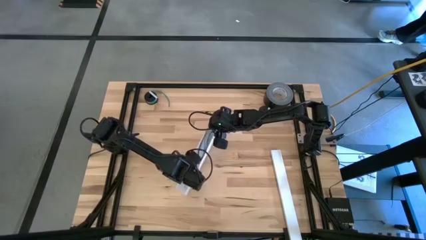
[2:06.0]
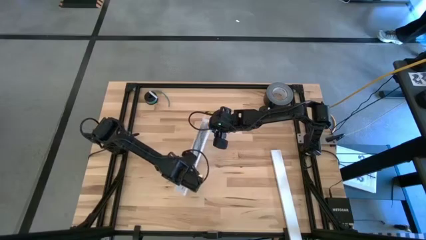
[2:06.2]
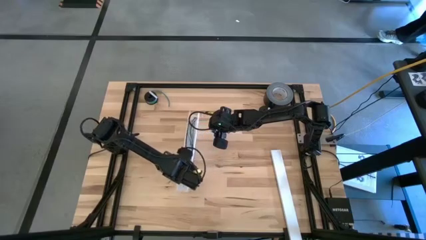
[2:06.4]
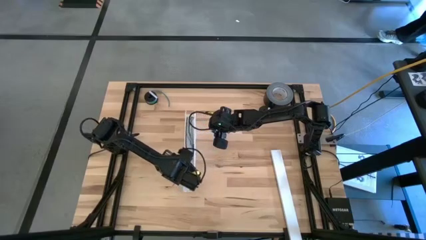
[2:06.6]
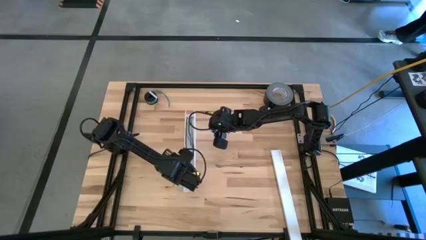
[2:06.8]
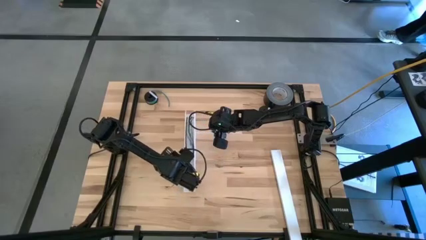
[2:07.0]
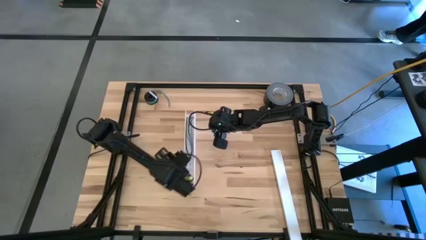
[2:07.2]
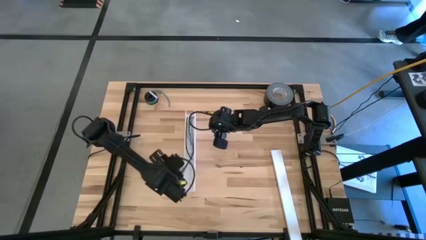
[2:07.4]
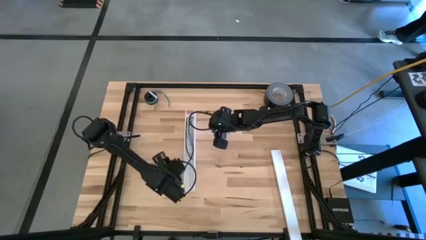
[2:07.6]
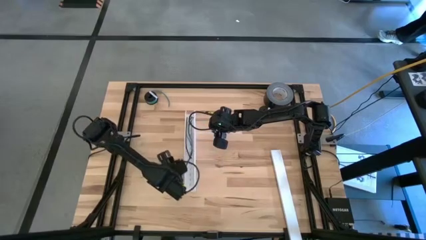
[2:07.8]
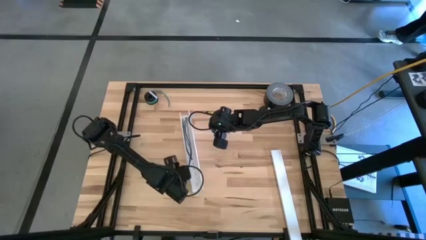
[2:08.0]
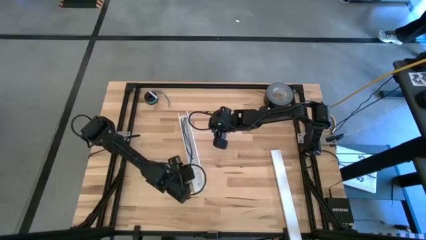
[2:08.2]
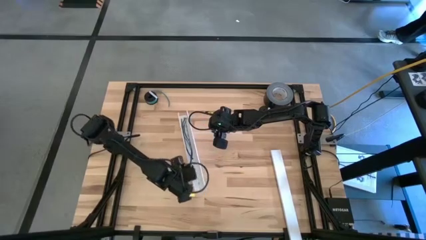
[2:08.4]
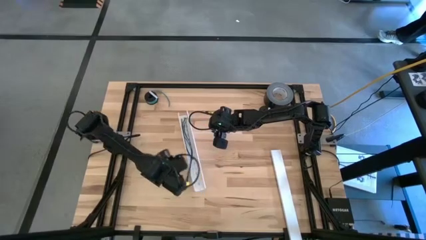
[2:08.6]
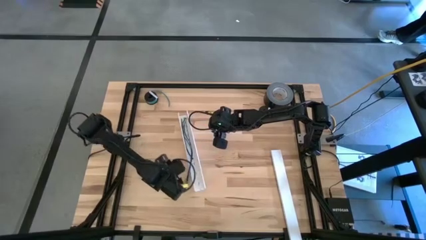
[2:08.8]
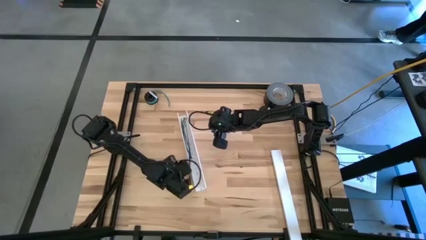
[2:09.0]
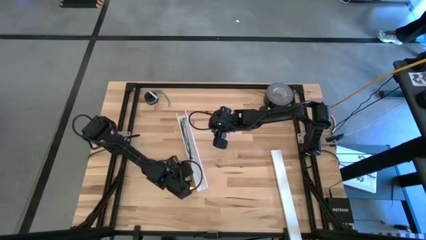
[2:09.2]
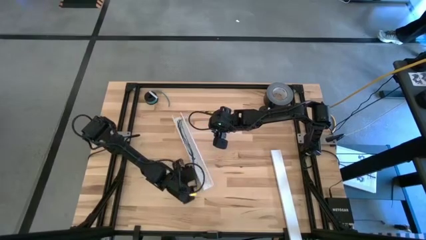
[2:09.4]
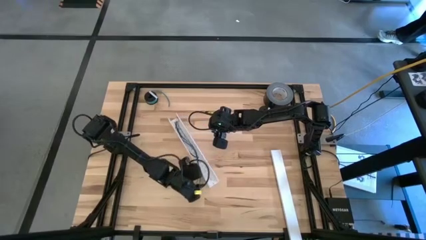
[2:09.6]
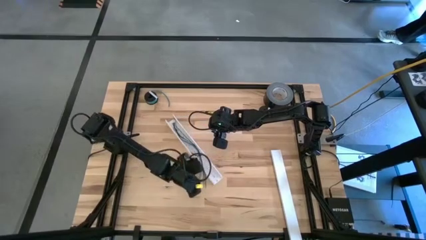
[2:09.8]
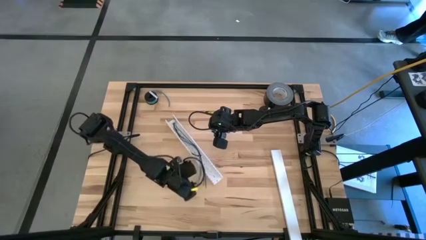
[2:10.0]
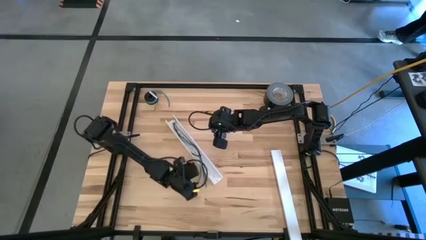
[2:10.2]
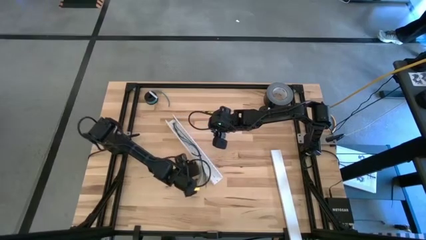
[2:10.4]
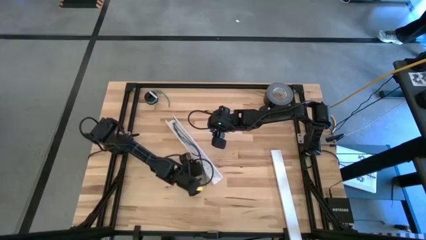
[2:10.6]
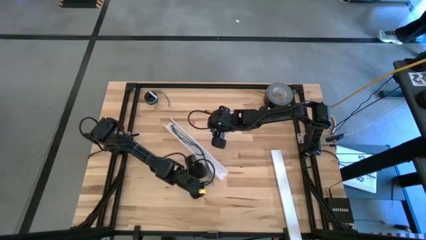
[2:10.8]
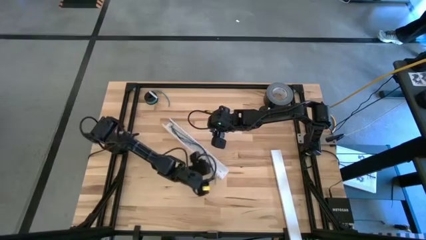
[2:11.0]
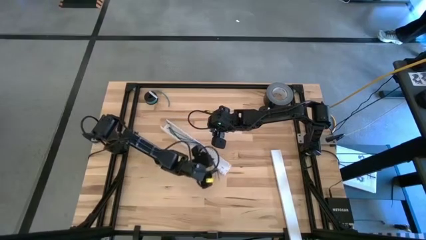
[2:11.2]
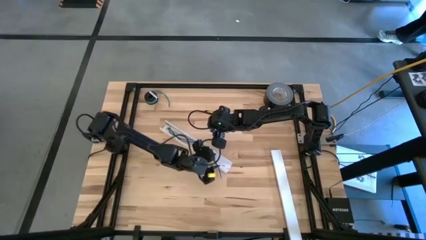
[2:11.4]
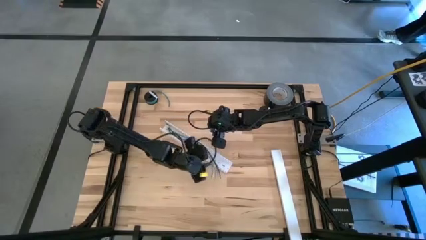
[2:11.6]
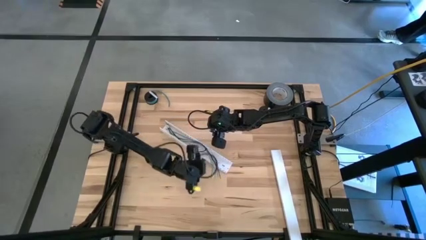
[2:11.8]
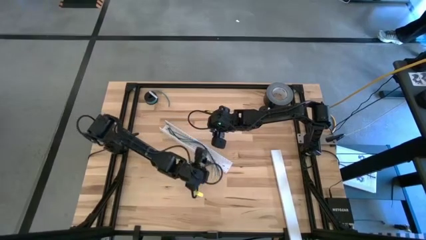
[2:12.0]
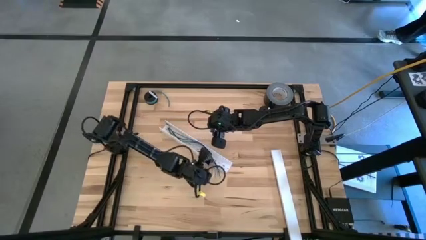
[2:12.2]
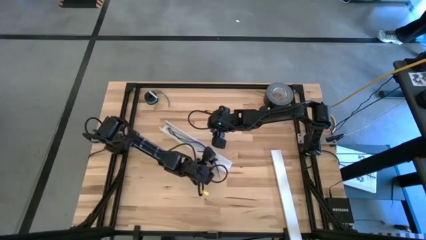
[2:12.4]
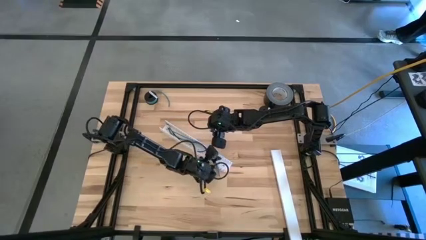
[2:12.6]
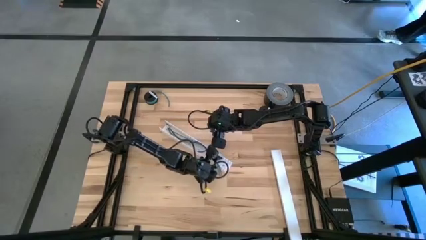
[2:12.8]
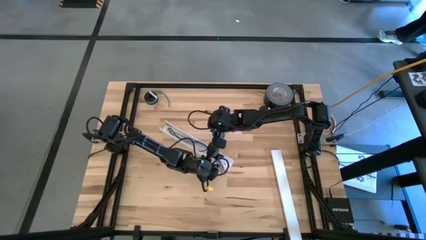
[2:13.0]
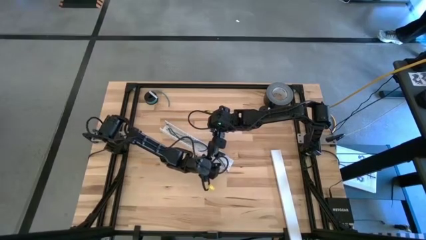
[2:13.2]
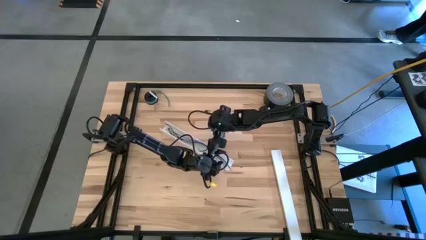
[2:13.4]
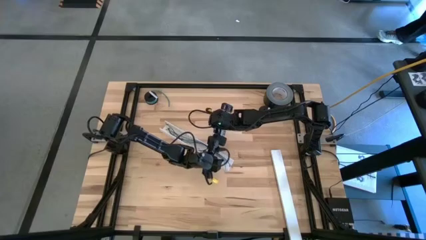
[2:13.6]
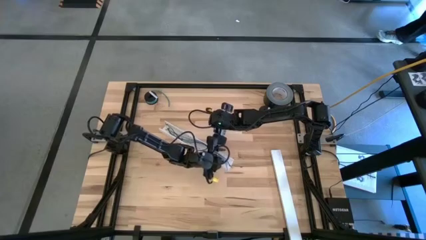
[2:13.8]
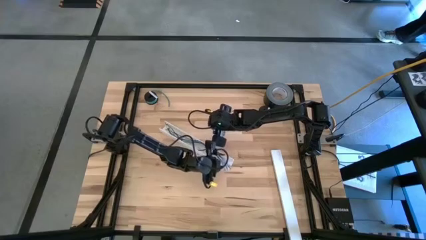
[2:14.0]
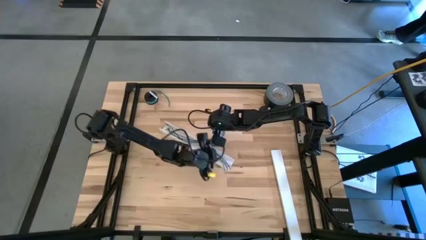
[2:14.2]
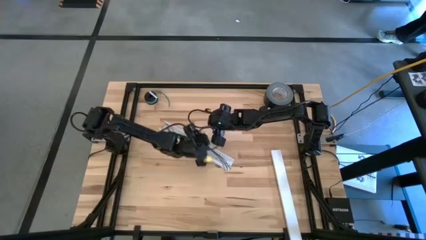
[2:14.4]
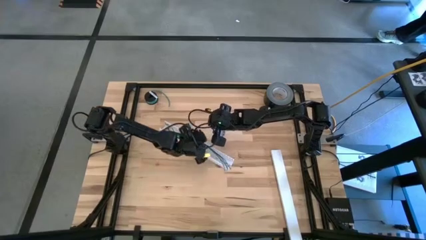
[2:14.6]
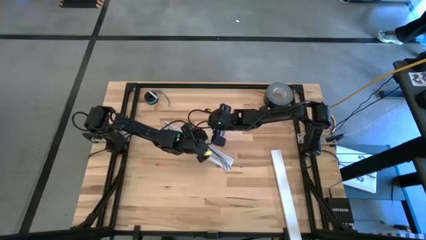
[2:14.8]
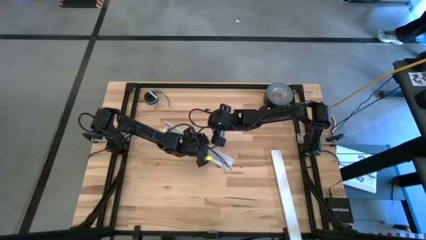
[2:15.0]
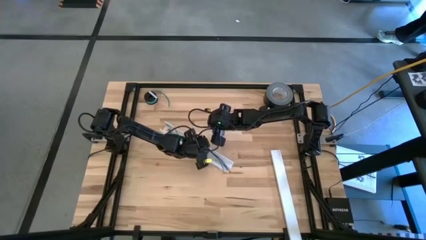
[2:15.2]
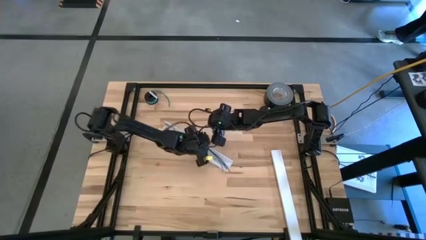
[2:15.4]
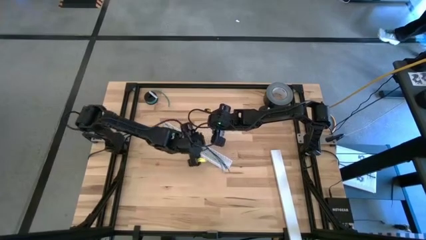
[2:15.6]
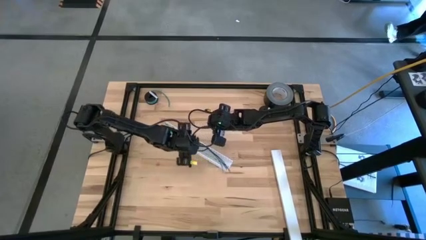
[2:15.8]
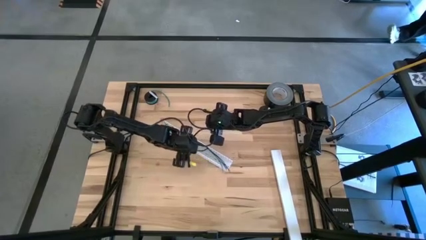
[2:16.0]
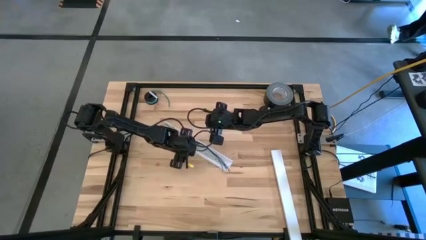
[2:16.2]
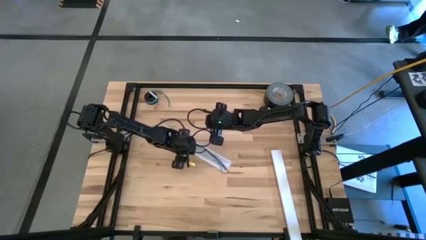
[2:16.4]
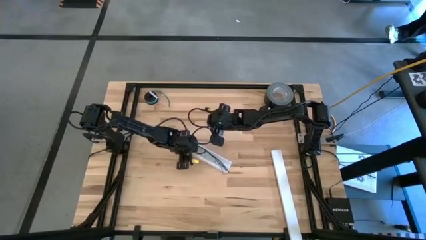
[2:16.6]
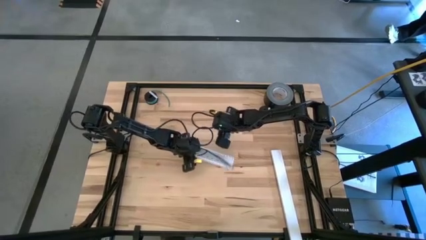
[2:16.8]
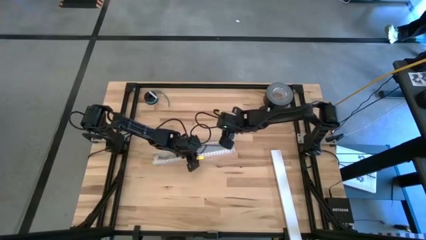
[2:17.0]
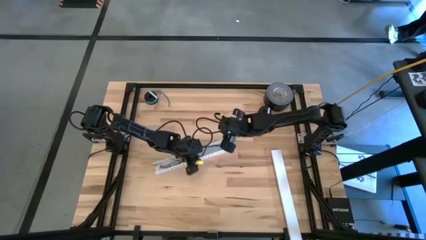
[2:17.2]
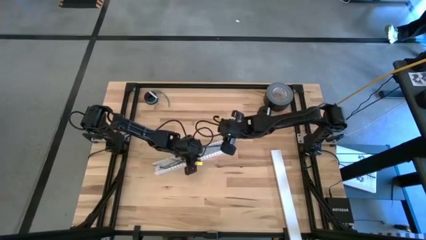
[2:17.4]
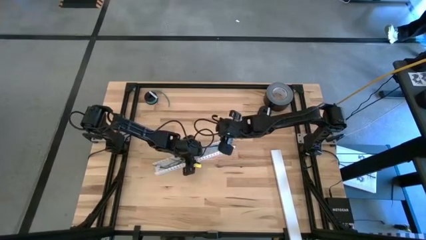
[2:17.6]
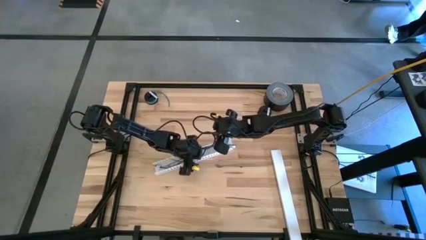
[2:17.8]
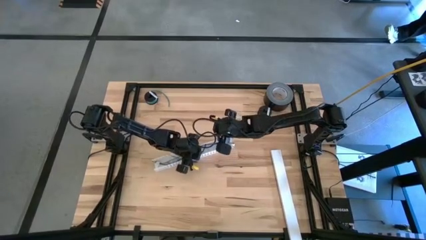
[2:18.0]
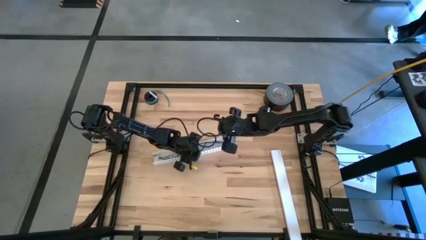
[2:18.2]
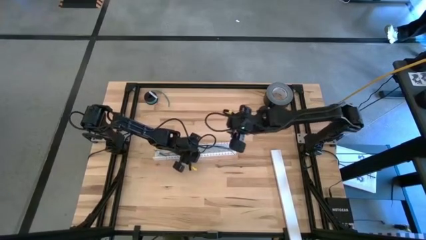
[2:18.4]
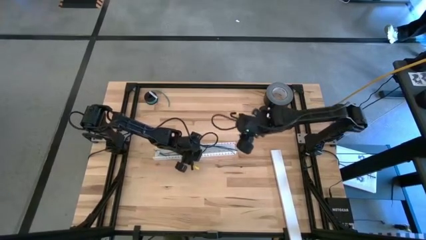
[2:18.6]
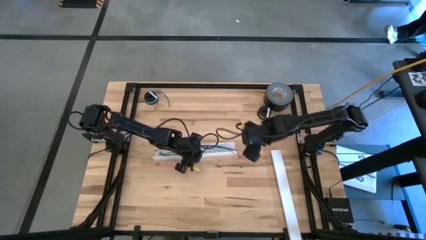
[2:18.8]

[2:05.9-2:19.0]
Task: Ziptie cables
Put the colored ziptied cable into the white cable duct

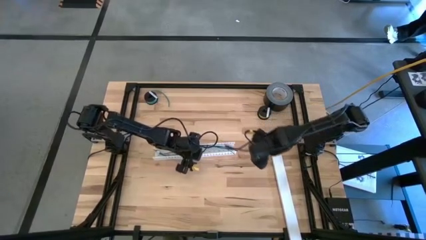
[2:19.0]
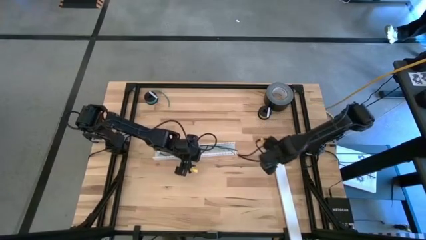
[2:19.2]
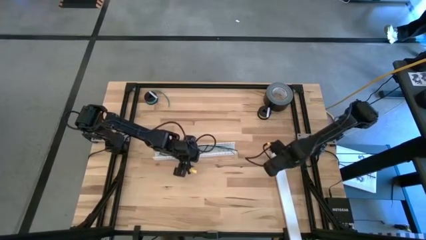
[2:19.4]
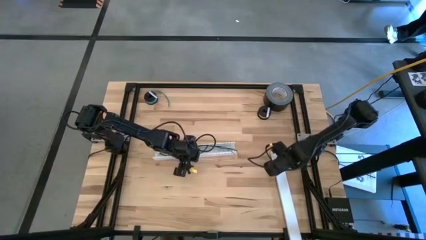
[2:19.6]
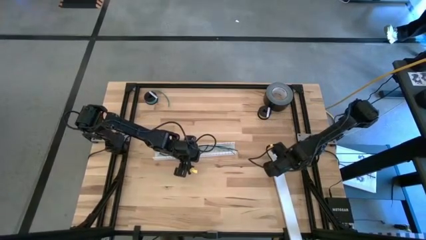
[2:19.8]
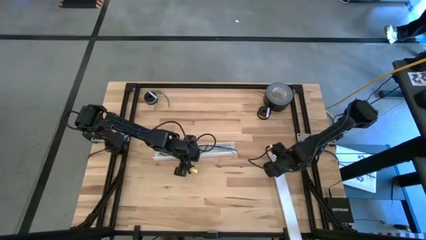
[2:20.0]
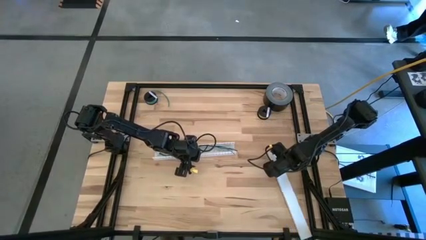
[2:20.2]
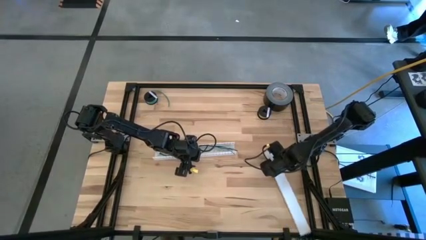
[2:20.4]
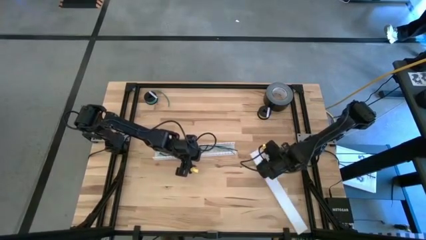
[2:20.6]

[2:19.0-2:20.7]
Close the white cable duct

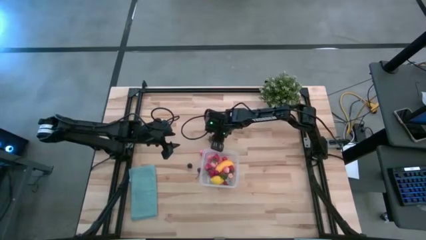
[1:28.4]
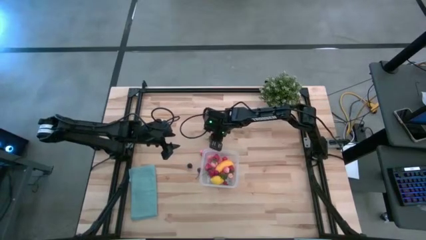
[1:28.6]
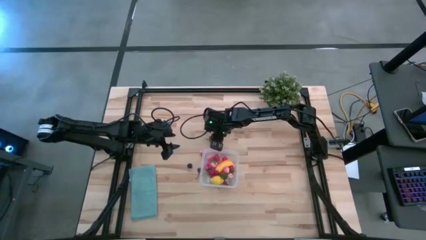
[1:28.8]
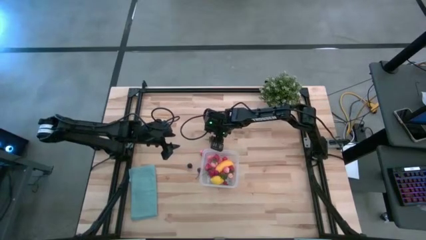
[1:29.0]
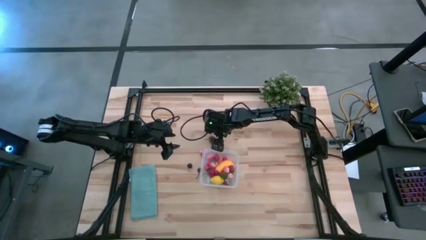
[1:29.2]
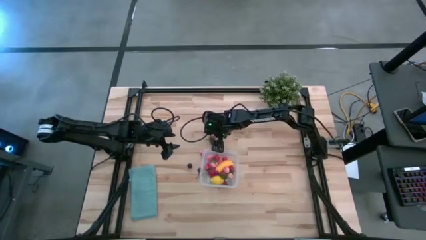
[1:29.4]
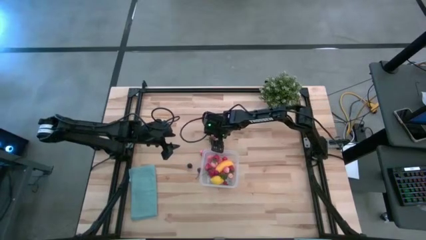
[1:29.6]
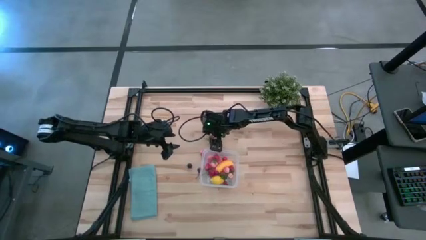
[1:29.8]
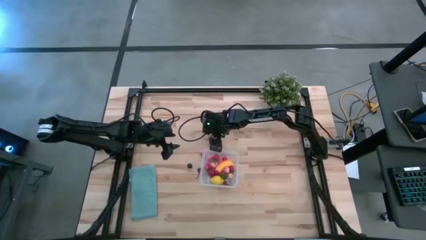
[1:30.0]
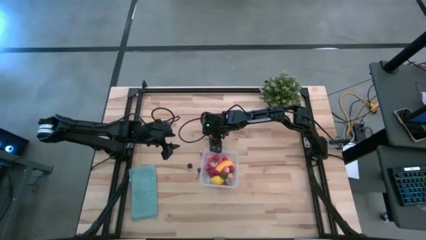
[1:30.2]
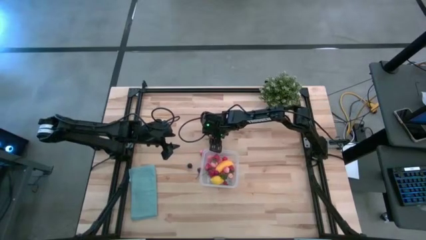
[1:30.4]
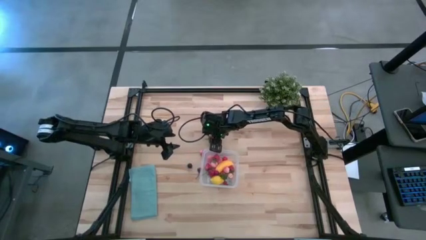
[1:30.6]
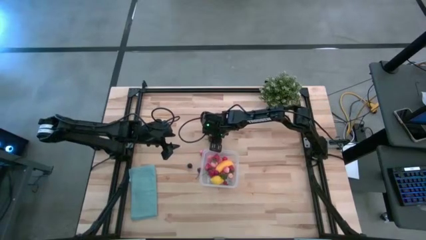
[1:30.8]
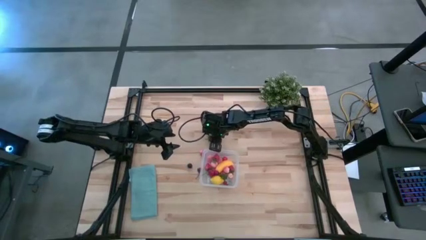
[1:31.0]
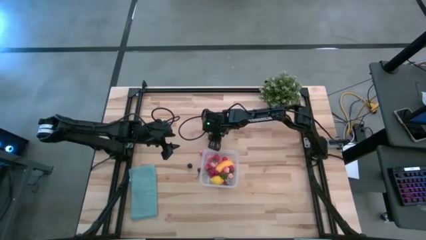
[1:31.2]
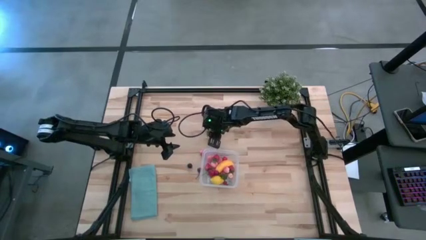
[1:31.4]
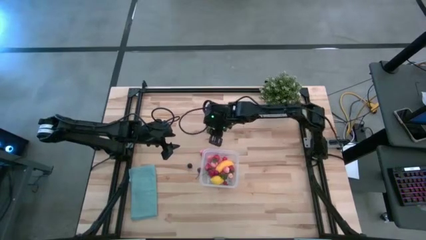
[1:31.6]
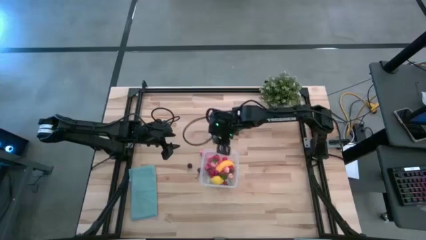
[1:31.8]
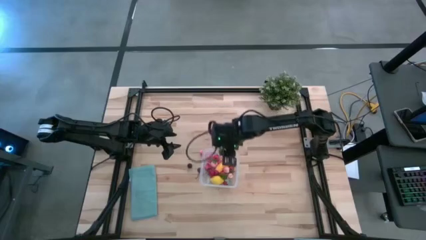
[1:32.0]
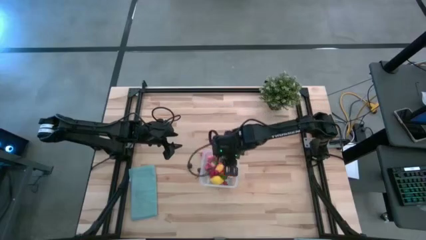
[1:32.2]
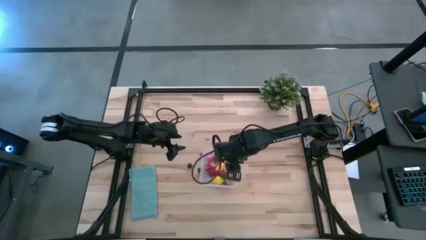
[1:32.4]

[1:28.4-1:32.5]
Task: Pick and placing Produce into tupperware
Put the red strawberry into the transparent container
